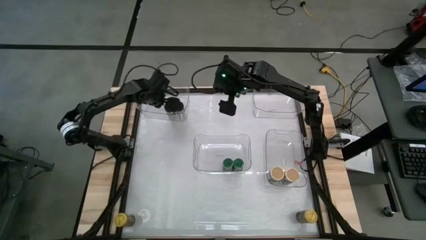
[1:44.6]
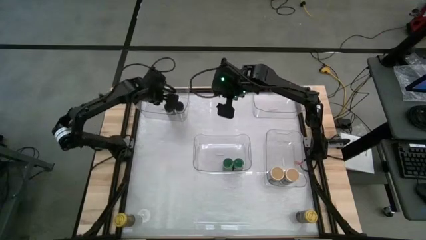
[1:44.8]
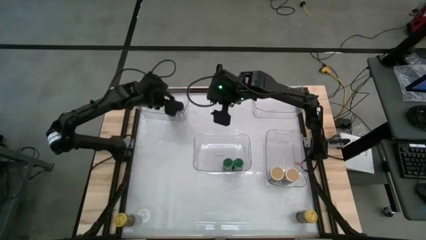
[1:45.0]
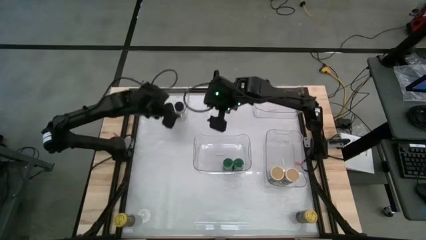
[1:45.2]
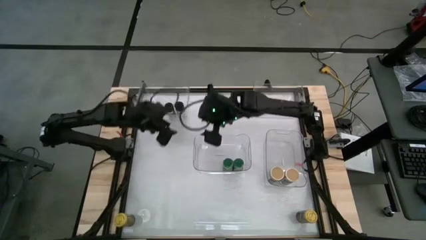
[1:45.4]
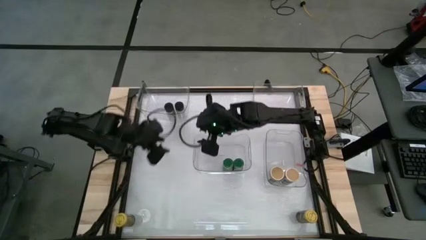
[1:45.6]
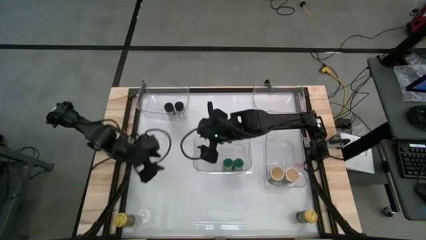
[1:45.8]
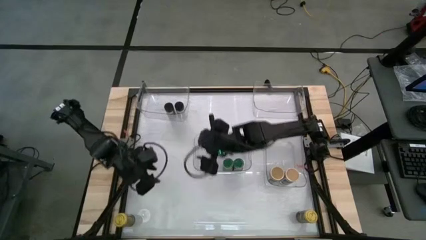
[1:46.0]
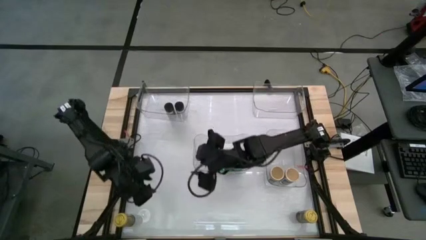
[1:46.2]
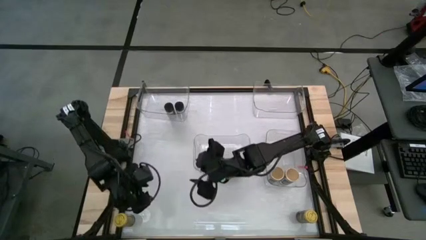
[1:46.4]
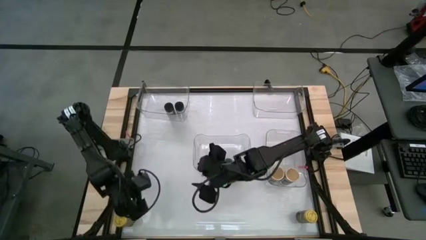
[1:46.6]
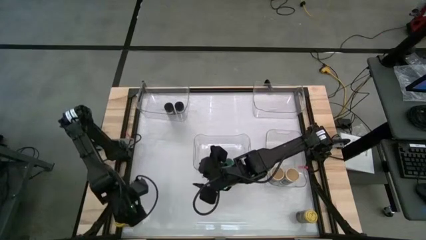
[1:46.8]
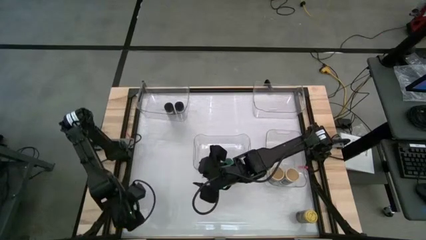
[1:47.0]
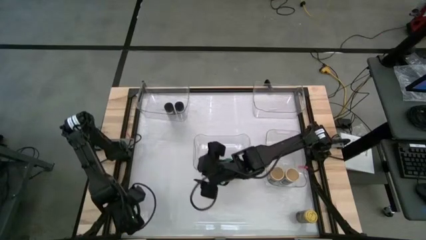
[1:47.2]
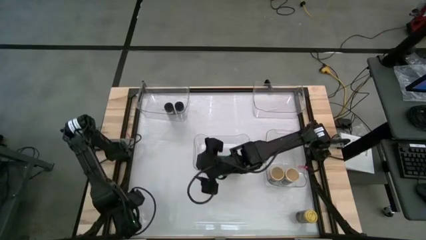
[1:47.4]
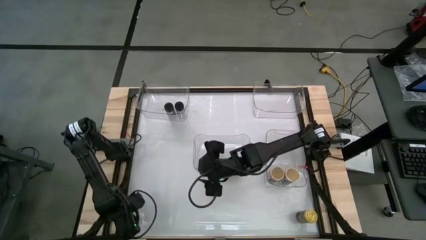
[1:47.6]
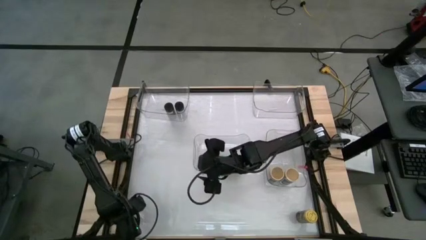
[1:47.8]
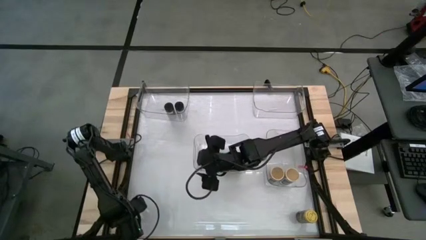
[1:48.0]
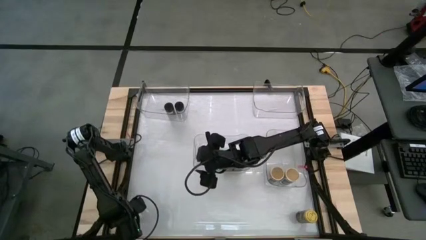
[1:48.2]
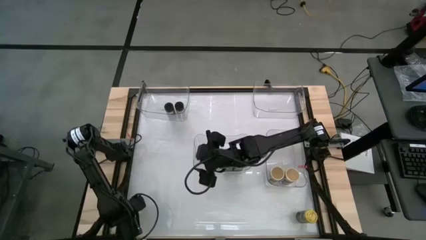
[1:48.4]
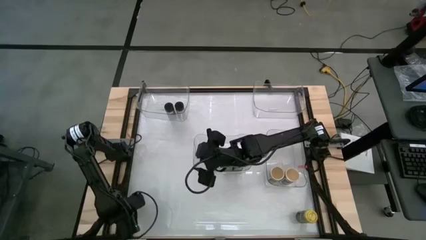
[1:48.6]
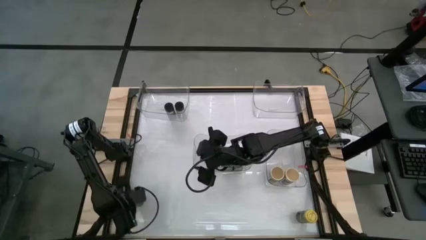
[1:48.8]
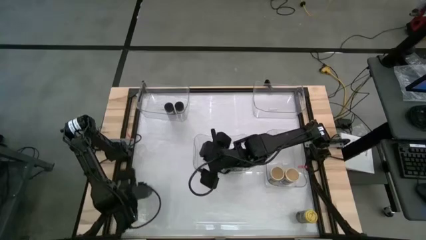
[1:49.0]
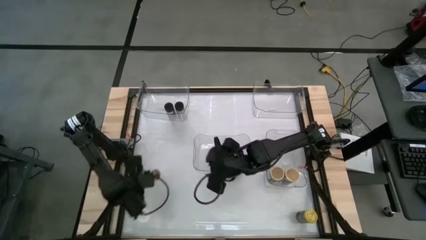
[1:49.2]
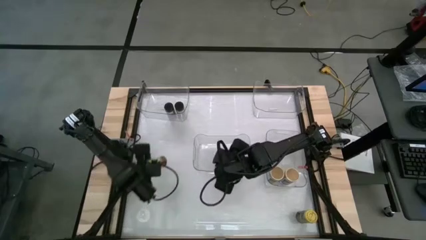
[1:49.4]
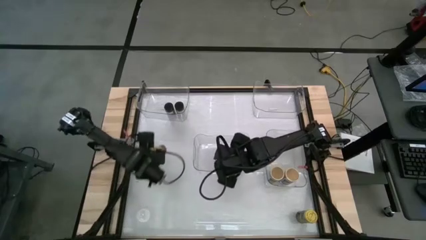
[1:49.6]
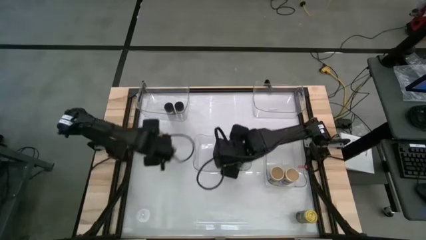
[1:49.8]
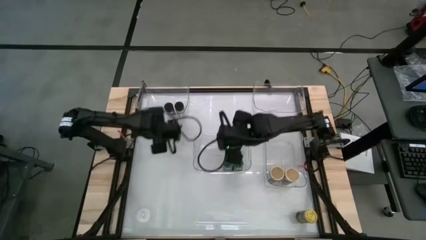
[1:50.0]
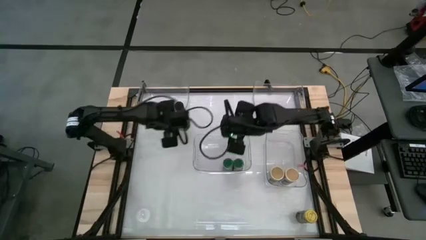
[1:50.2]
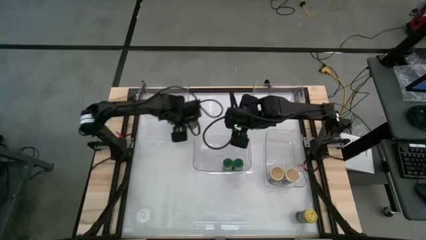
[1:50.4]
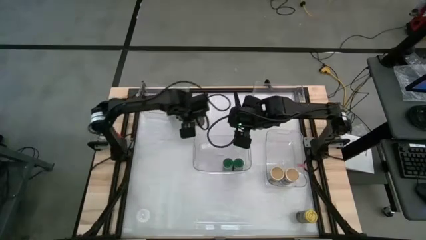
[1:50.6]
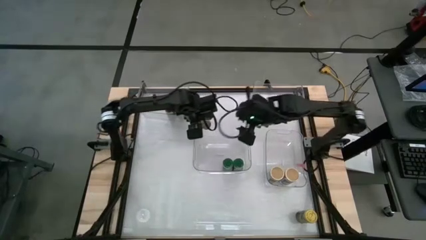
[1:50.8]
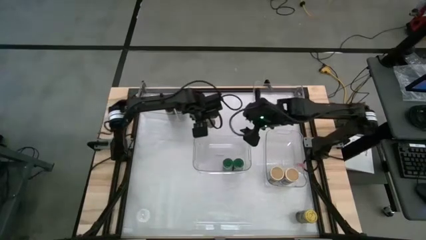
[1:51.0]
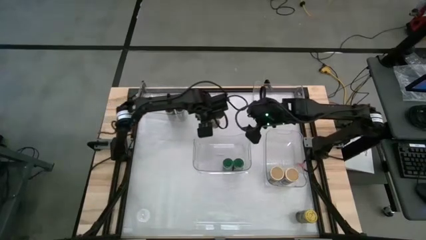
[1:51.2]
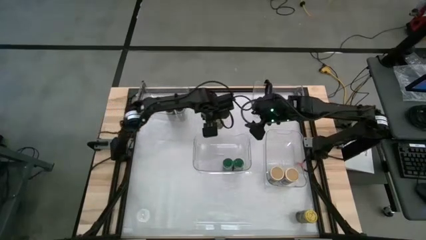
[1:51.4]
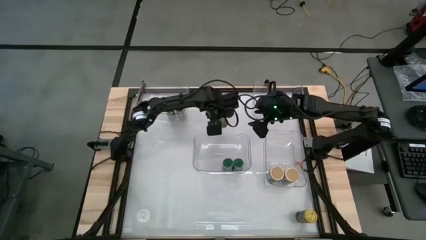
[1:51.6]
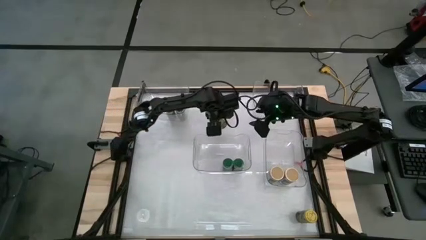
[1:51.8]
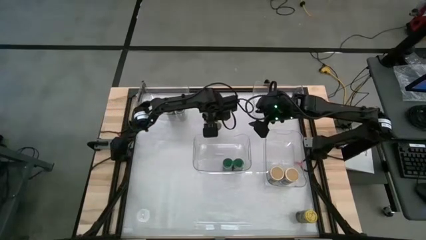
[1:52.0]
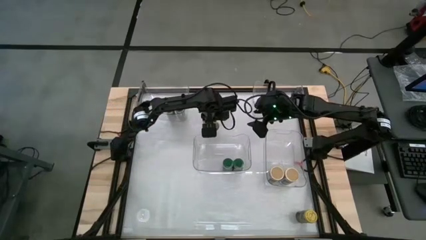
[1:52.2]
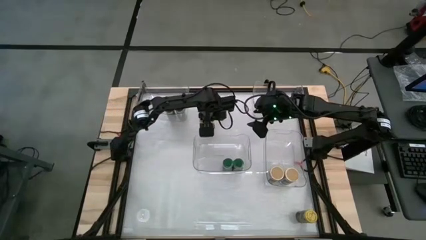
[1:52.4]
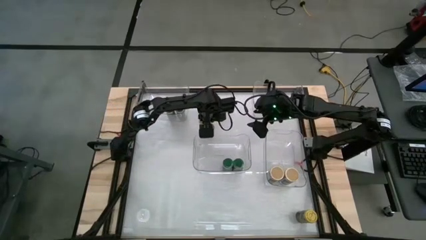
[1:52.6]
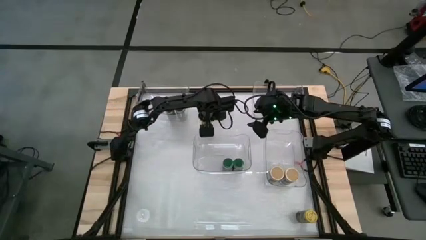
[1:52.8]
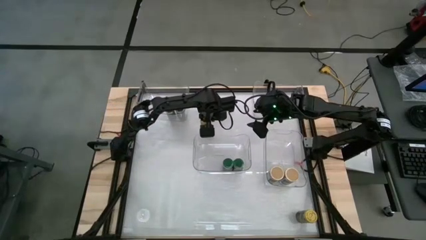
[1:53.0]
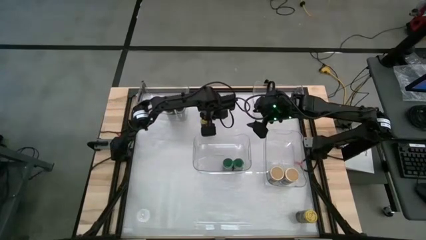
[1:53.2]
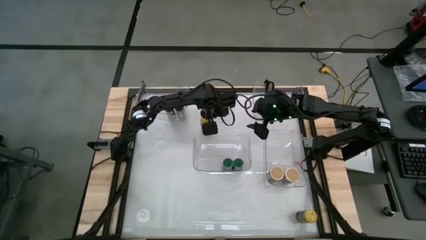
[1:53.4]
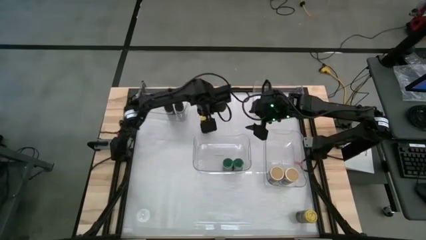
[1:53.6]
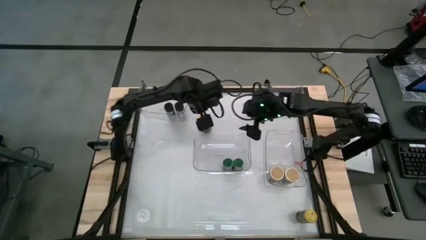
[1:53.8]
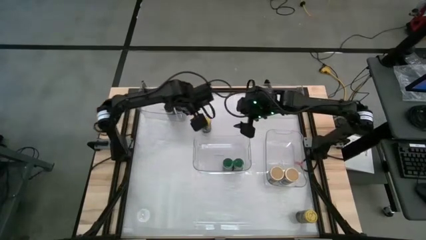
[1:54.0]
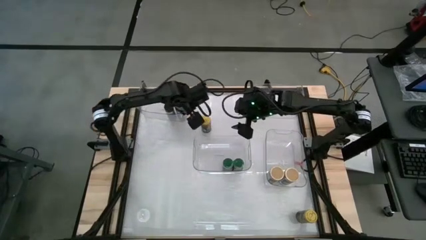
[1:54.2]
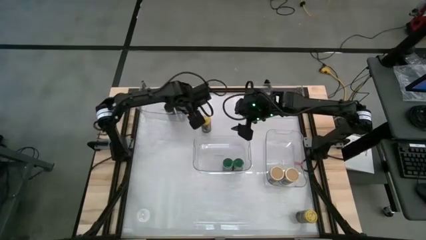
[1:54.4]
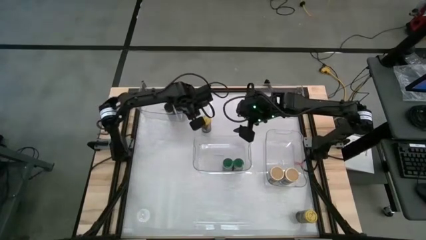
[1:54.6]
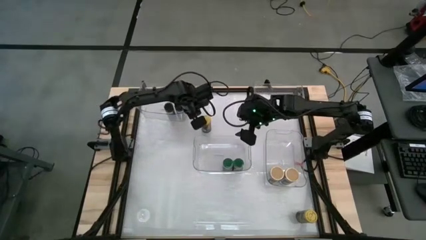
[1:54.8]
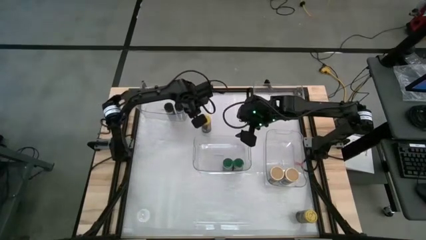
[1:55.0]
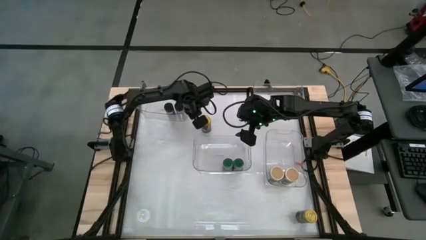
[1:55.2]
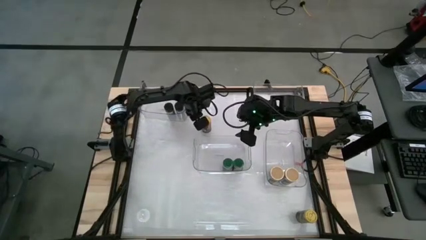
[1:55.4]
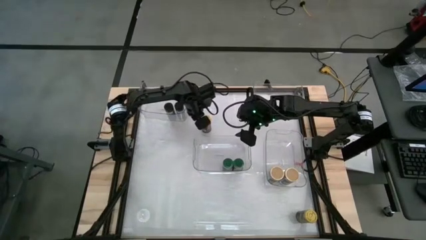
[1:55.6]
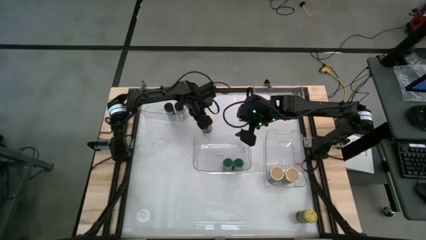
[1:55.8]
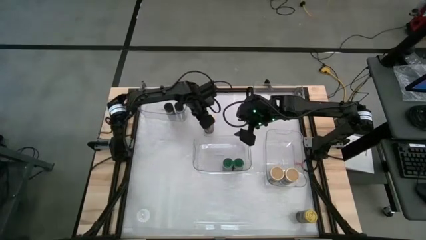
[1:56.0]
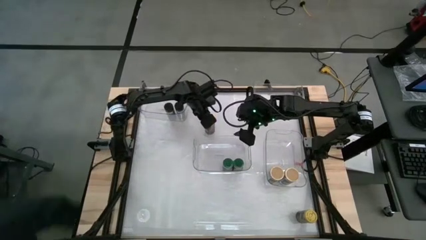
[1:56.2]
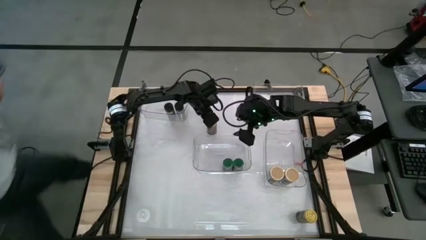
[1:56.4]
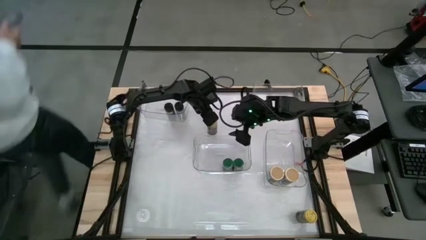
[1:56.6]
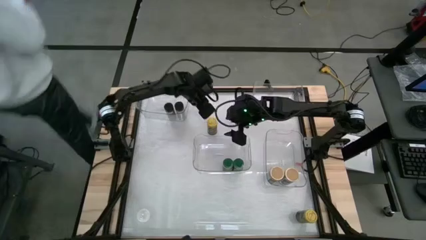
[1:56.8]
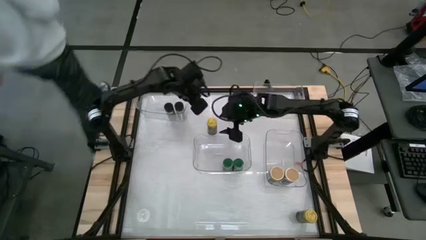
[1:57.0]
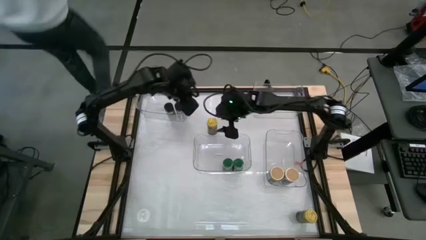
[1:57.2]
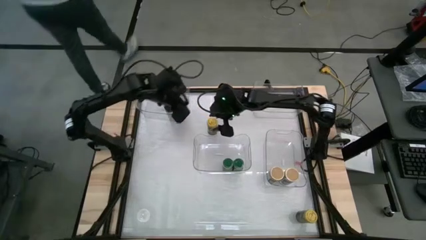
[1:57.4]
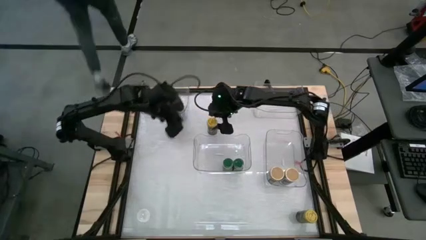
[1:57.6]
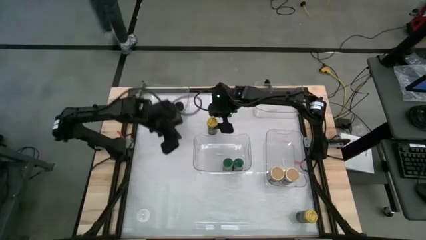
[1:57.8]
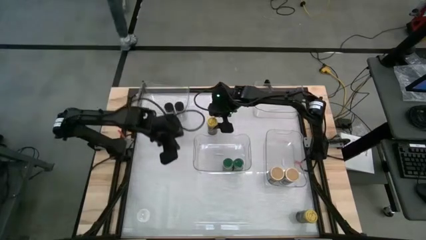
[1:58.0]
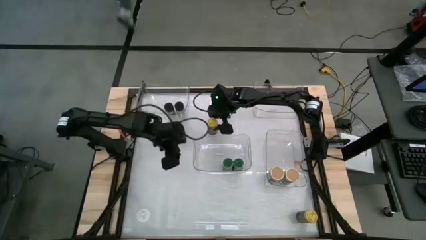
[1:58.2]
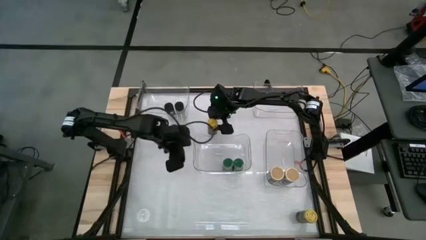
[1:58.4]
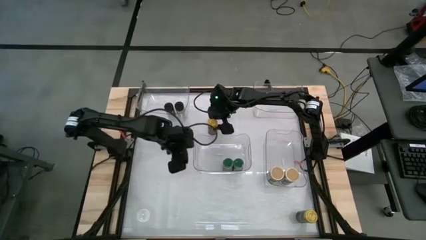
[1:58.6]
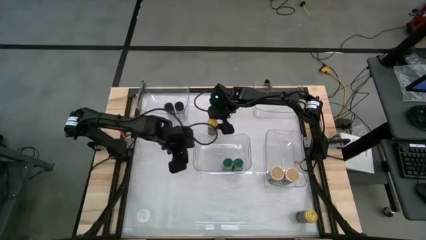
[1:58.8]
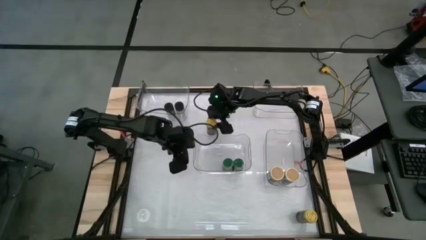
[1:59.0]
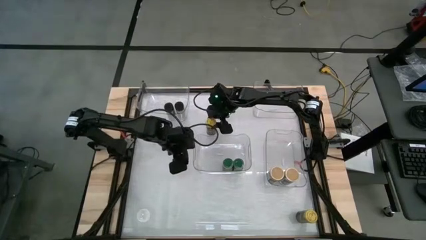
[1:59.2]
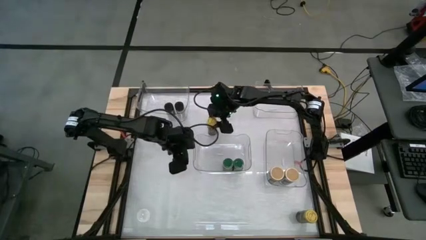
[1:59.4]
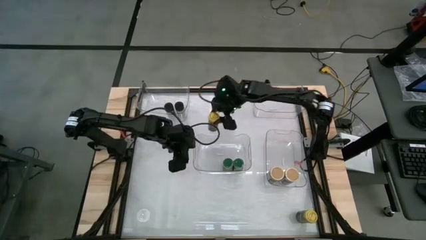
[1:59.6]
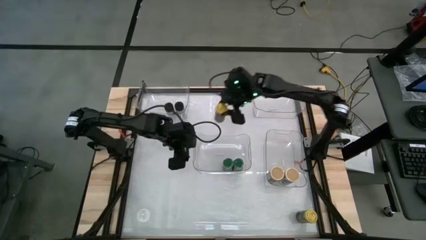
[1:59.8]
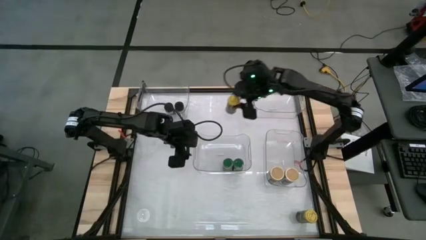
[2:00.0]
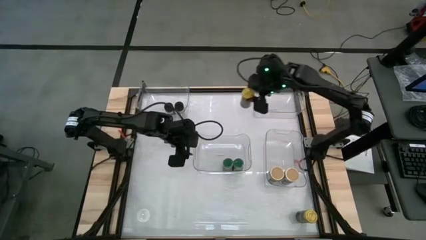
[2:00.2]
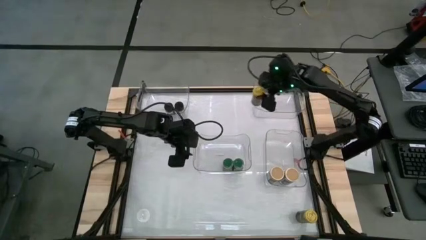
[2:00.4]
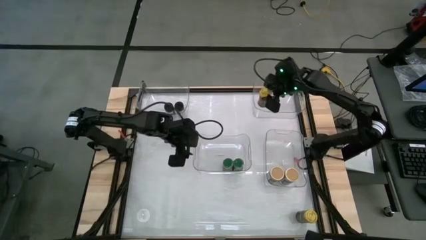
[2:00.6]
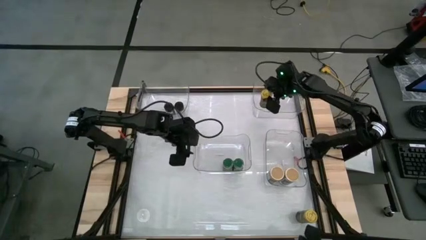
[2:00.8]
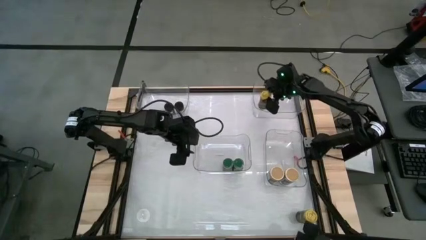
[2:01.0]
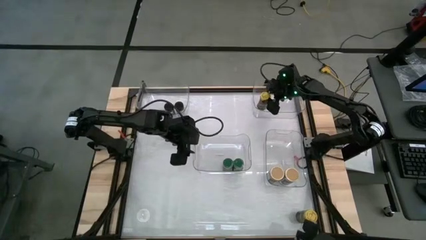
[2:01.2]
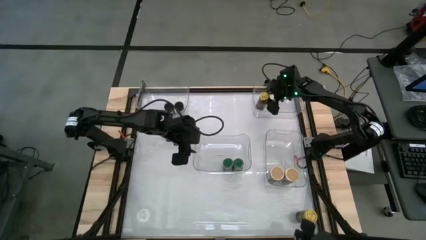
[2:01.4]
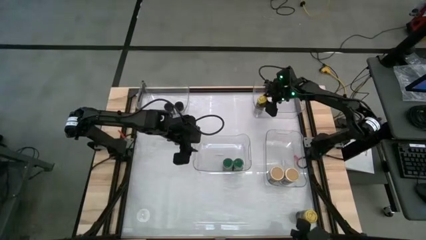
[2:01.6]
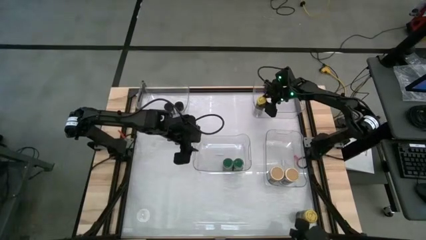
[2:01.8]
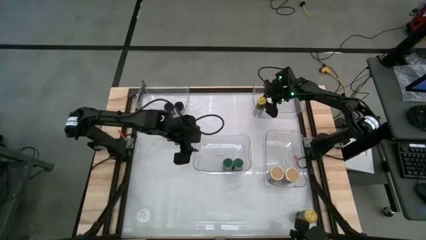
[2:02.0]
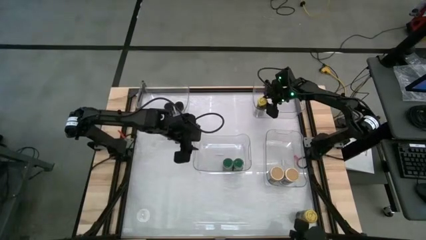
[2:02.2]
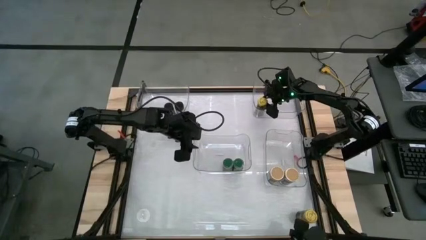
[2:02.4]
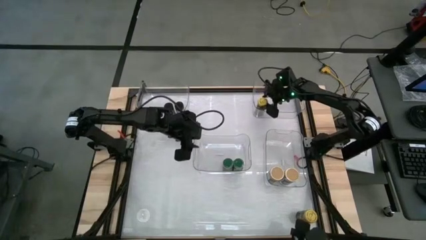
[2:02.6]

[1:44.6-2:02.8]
Task: Sort spices by type
Put the left yellow seasoning bottle into the top right transparent bin
